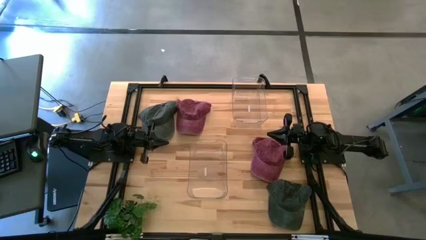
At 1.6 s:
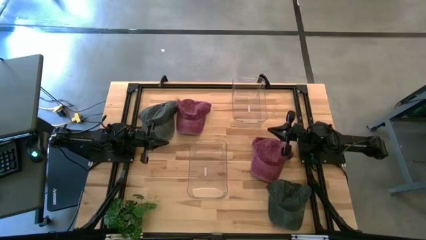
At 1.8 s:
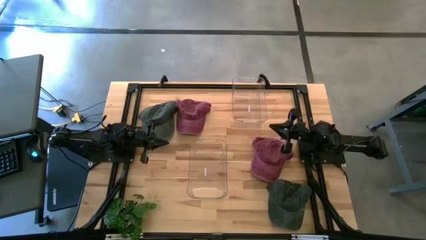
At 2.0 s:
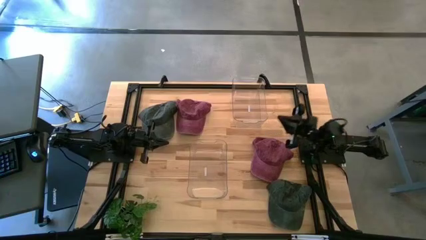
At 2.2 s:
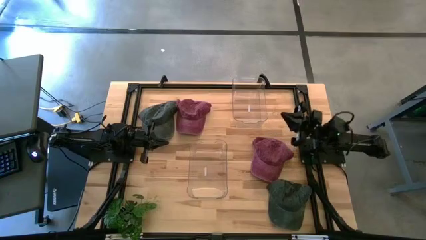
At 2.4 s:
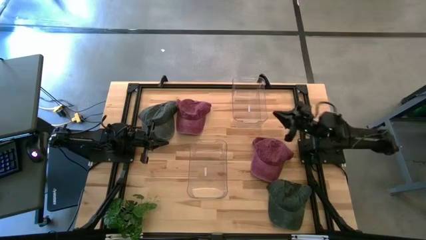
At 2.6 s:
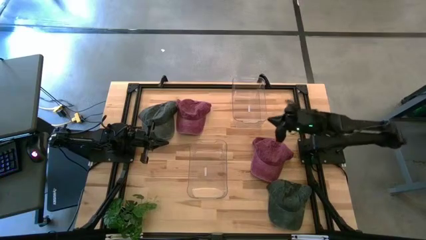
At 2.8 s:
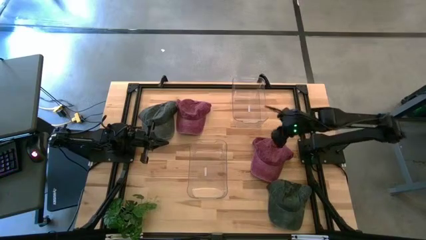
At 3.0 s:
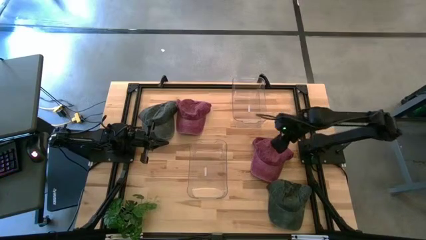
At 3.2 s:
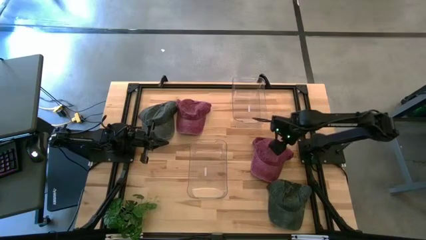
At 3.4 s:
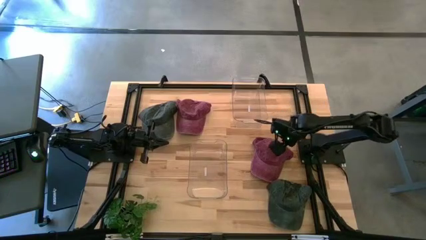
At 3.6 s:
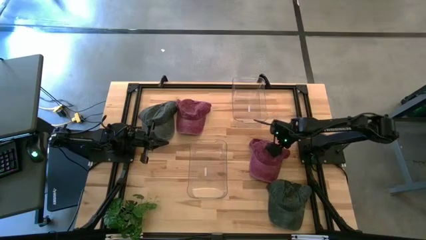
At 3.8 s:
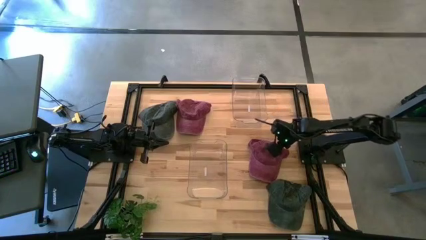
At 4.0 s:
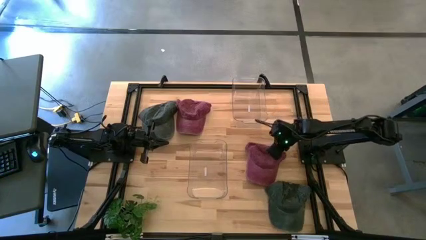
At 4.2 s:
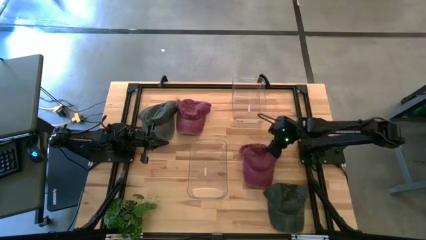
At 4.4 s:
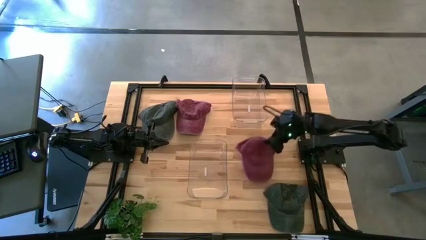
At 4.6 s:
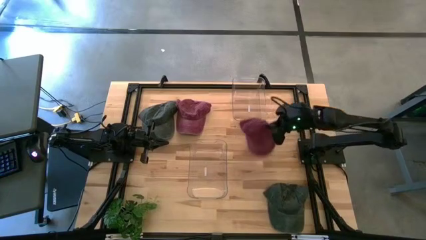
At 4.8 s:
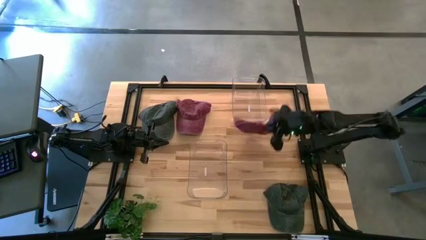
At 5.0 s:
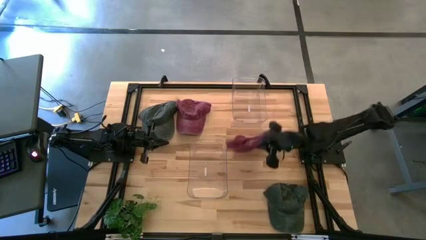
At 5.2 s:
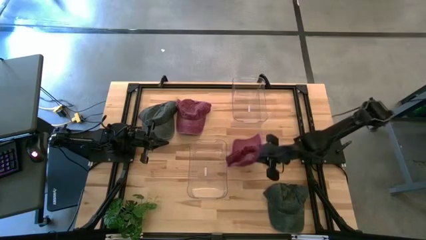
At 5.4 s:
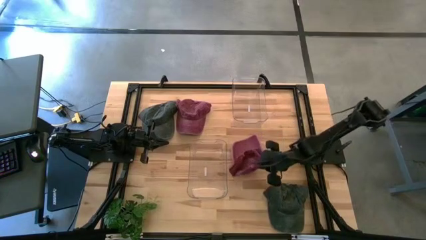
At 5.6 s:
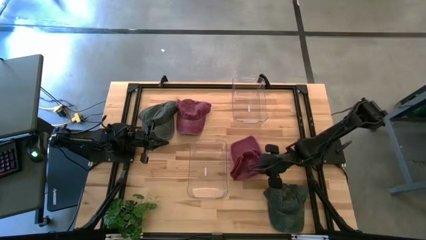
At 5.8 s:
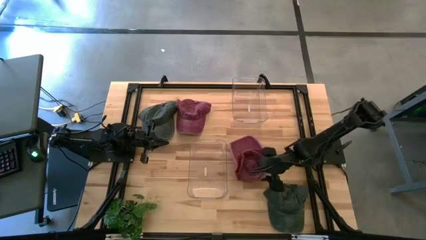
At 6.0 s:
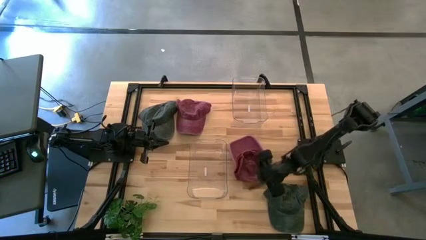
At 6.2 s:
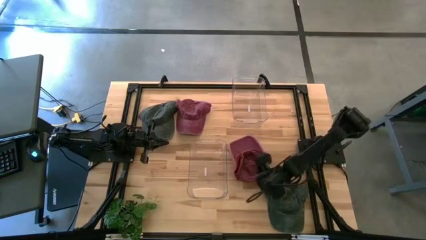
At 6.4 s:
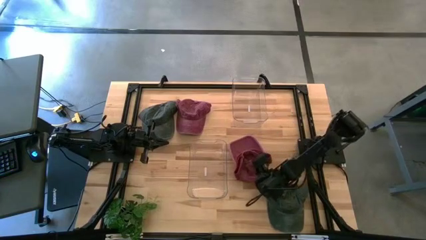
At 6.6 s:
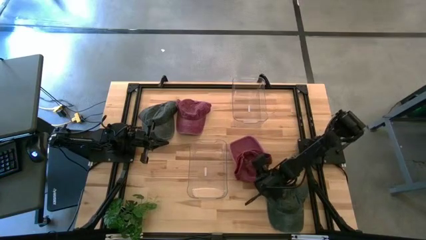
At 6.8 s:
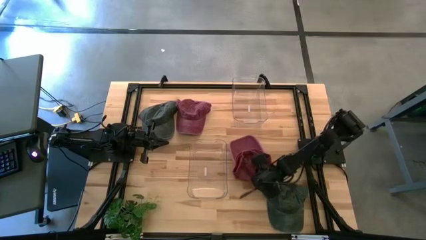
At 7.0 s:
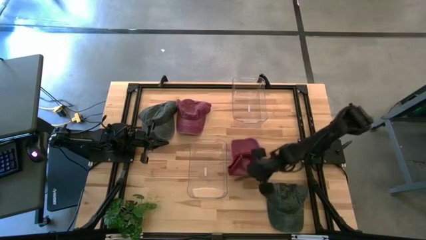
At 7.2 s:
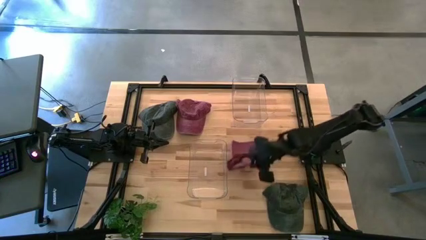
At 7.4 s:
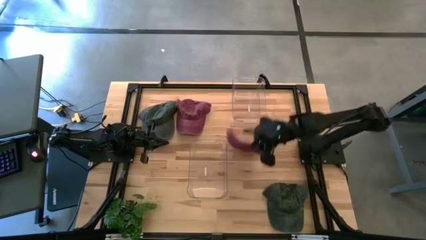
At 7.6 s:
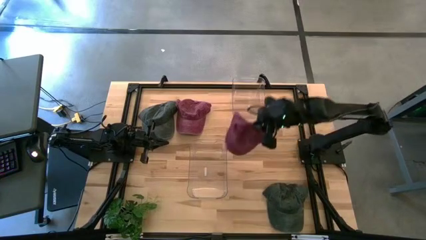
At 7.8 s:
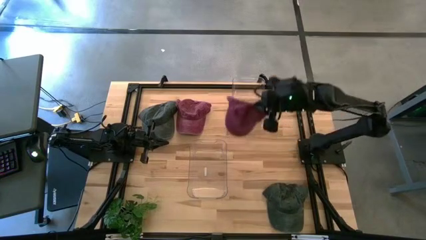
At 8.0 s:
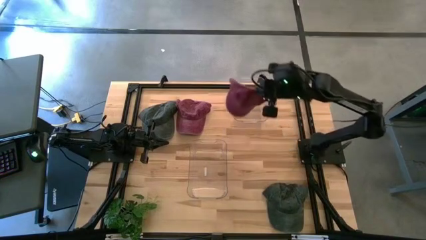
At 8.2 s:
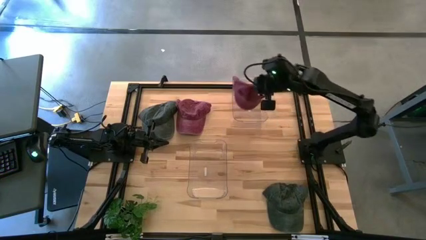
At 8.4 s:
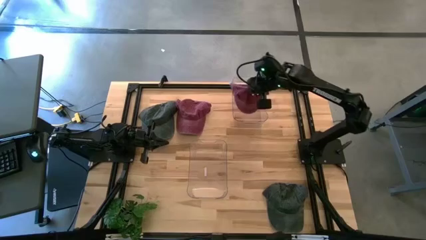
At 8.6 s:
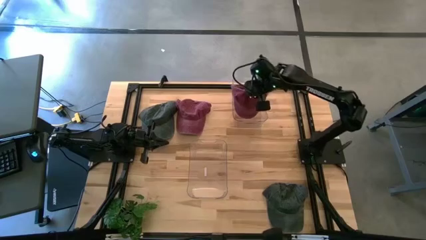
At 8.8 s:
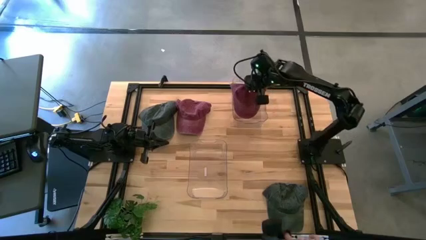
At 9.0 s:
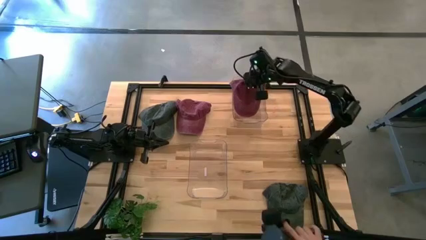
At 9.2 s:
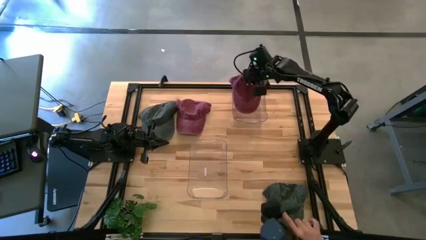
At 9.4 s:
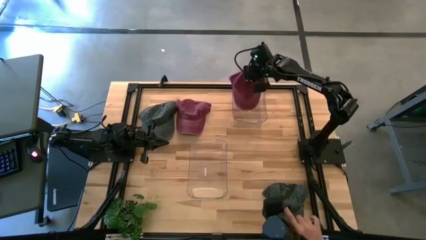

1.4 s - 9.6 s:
Task: Pick & Place hat
Put the right red cap into the top right transparent bin

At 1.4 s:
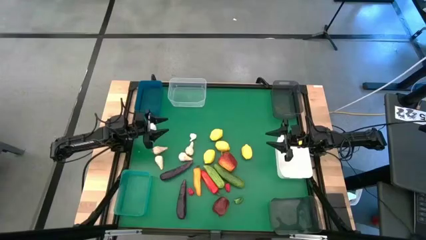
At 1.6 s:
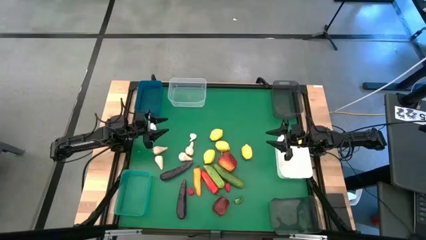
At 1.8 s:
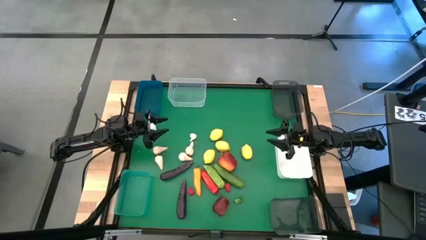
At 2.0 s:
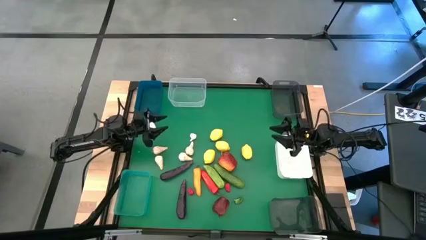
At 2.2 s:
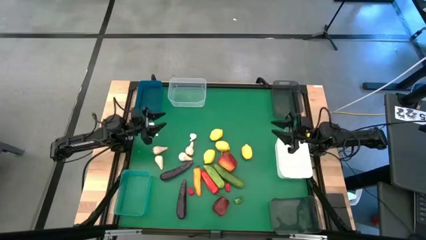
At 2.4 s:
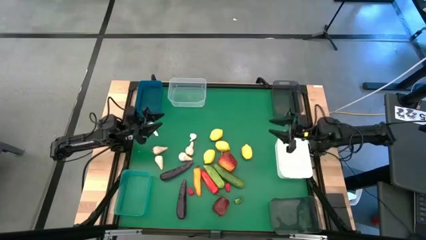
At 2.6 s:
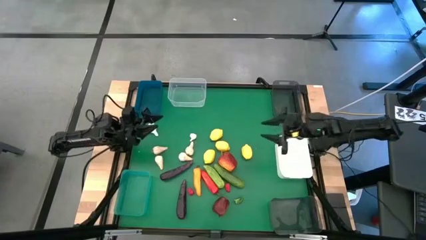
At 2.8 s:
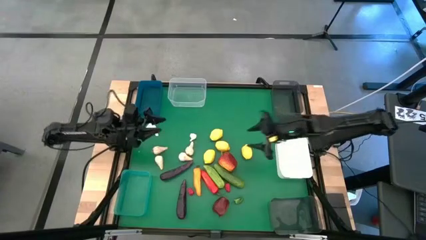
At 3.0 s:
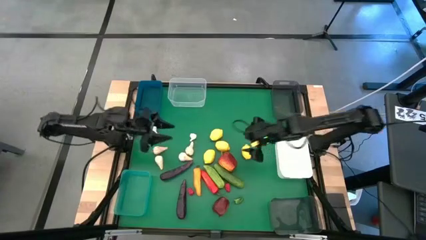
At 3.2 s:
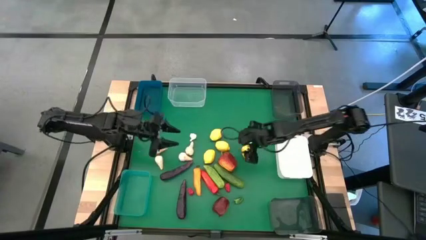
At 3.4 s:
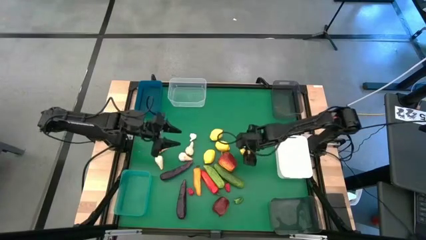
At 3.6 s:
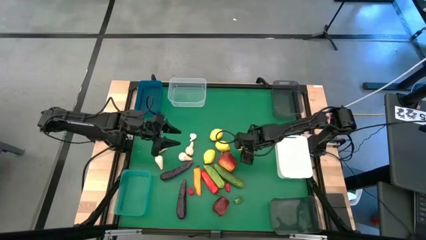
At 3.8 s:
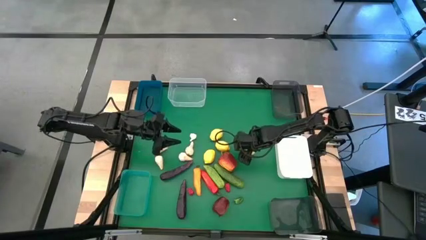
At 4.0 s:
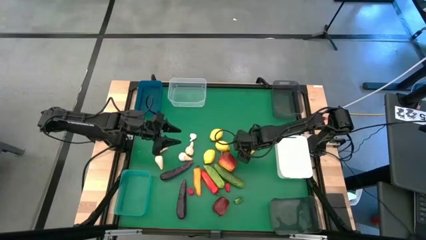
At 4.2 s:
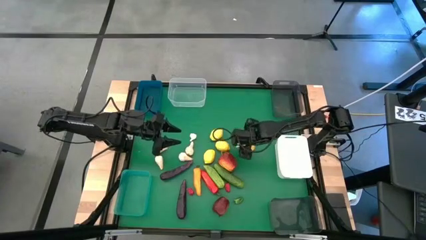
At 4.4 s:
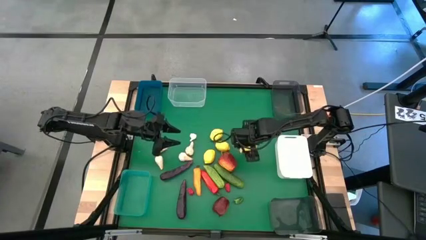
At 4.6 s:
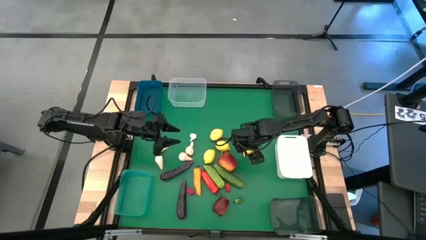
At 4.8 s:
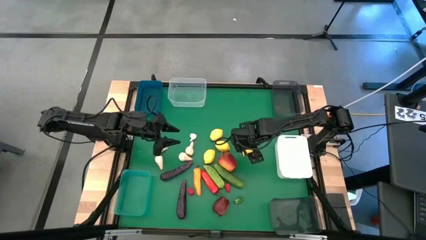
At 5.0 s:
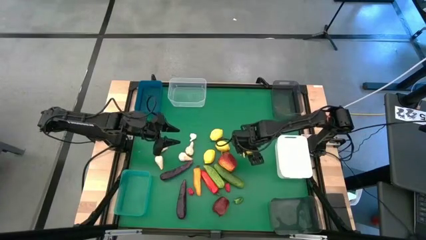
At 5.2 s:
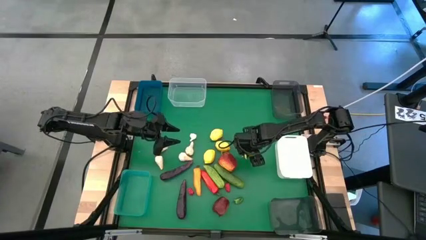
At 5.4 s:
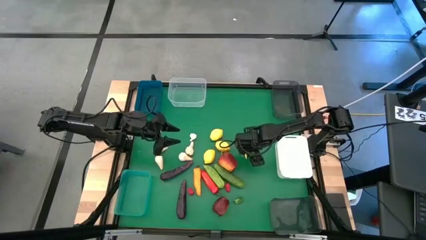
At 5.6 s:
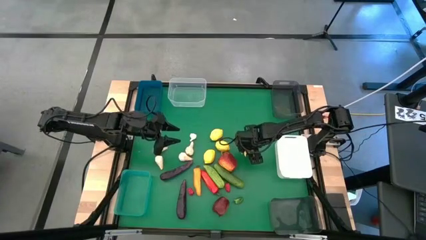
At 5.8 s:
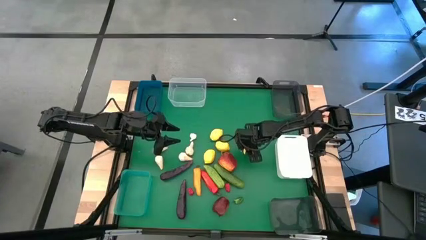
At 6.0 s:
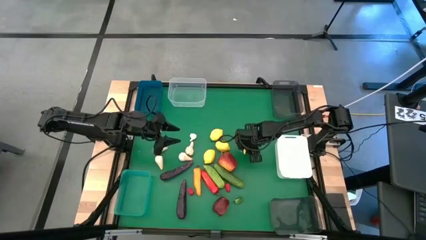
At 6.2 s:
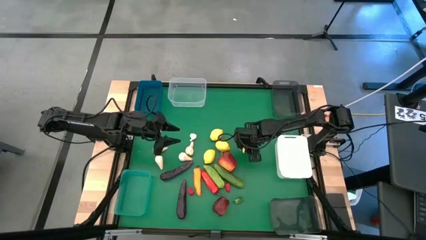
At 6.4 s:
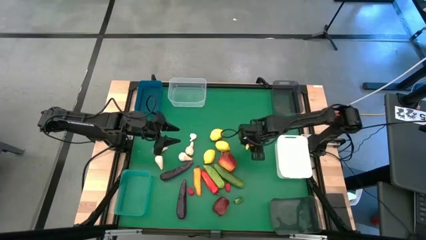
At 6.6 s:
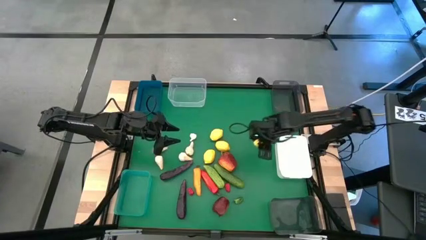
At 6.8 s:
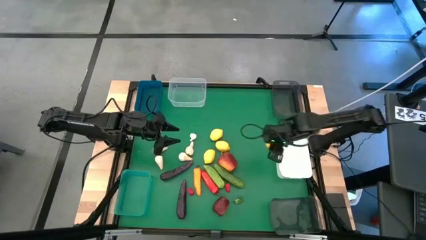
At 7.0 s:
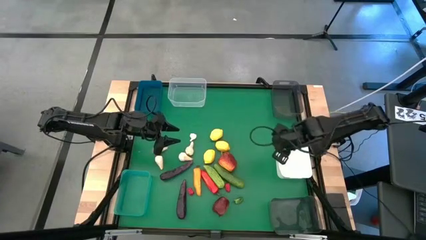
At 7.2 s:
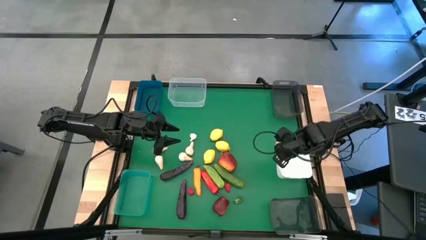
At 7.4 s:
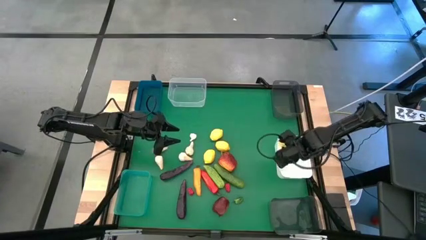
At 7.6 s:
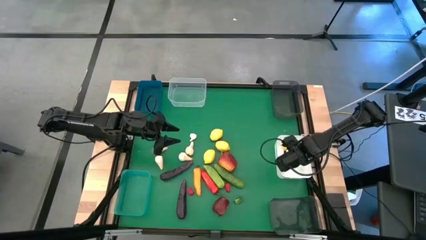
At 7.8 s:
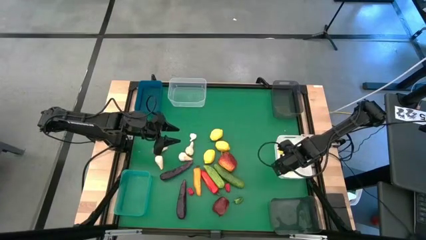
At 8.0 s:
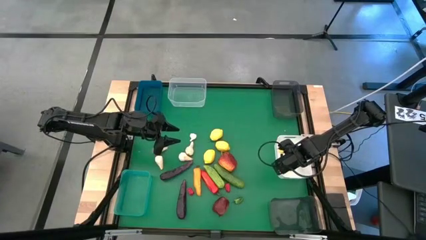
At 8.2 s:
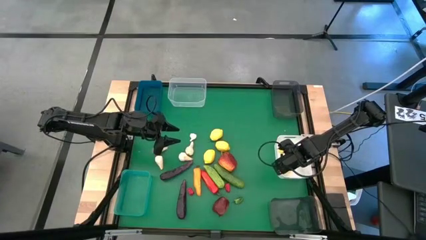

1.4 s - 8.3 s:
Task: Sort produce into baskets
Put the yellow lemon into the white bin
